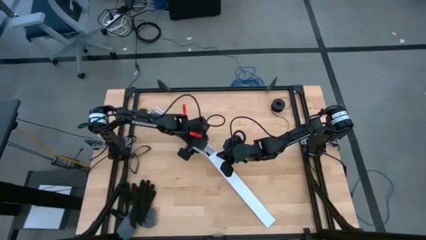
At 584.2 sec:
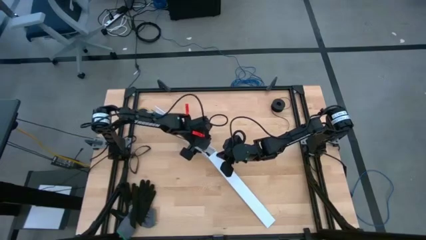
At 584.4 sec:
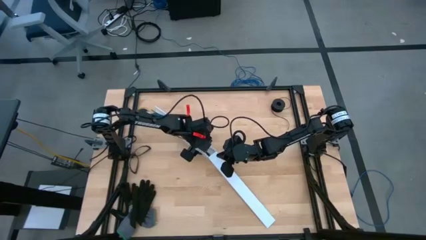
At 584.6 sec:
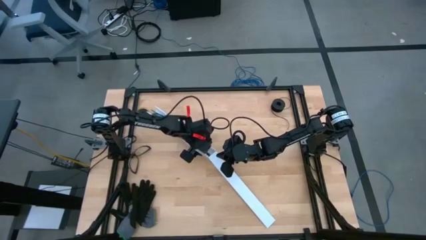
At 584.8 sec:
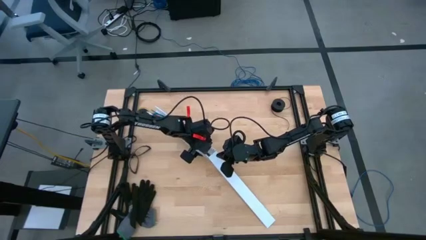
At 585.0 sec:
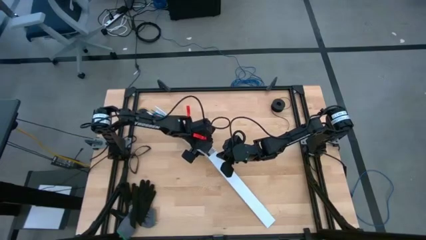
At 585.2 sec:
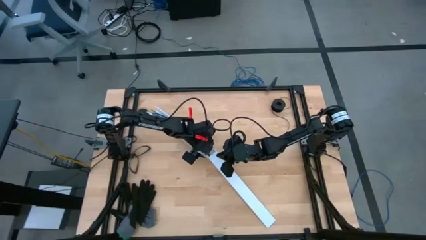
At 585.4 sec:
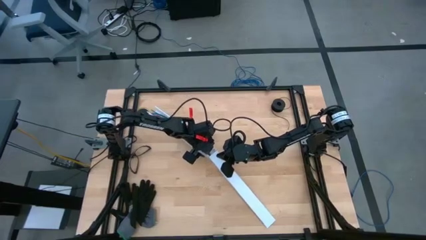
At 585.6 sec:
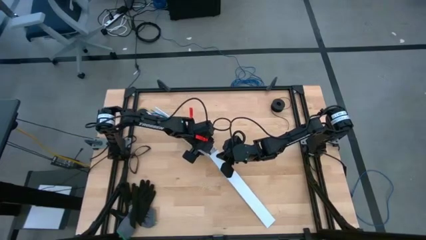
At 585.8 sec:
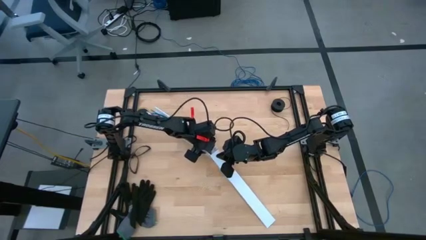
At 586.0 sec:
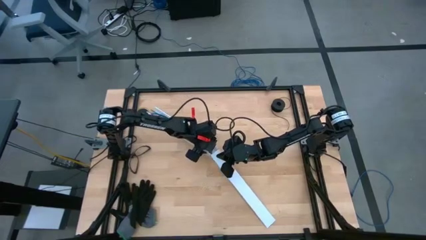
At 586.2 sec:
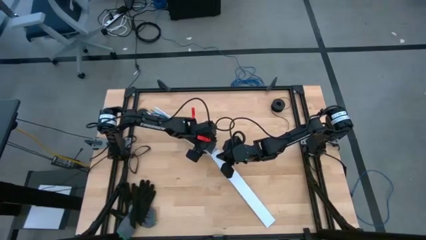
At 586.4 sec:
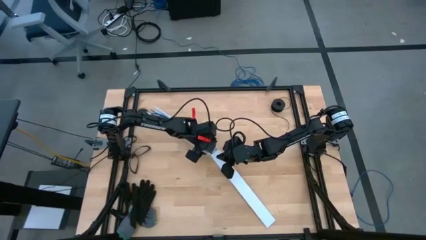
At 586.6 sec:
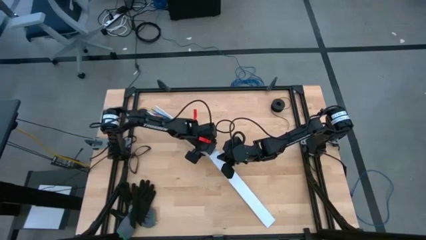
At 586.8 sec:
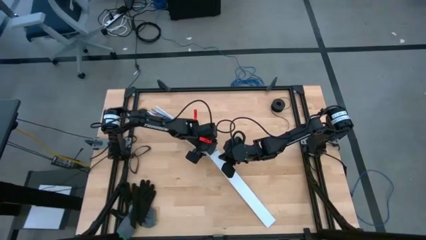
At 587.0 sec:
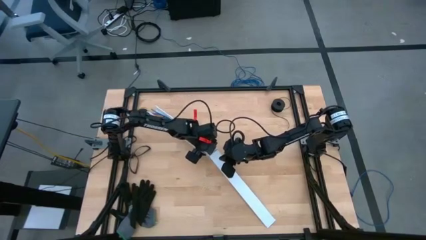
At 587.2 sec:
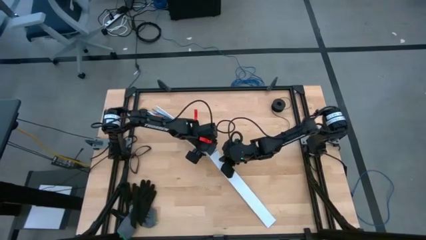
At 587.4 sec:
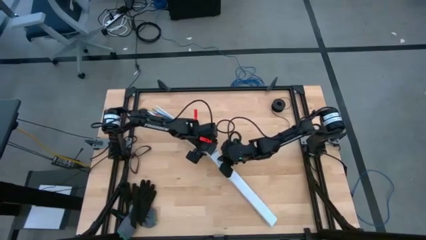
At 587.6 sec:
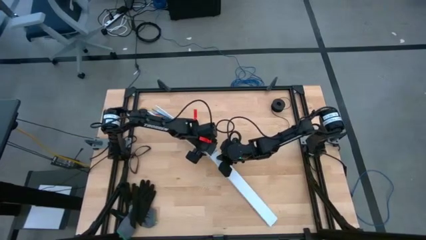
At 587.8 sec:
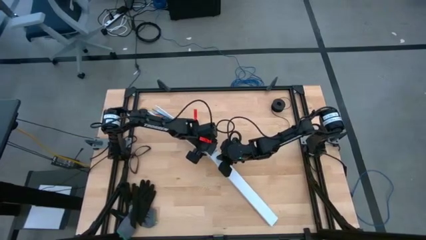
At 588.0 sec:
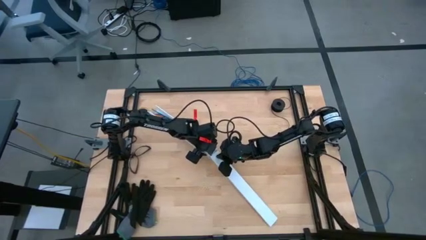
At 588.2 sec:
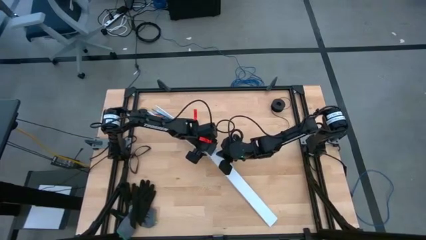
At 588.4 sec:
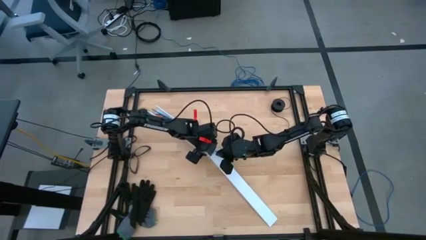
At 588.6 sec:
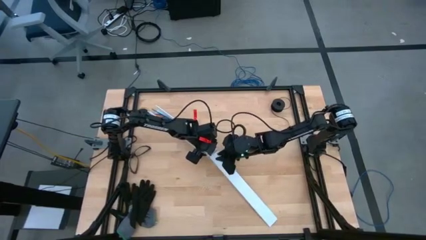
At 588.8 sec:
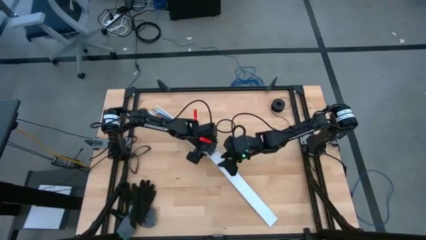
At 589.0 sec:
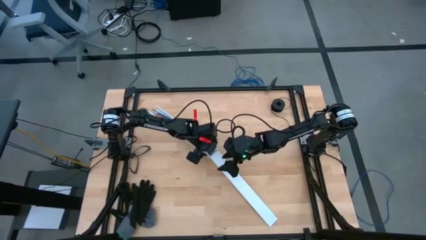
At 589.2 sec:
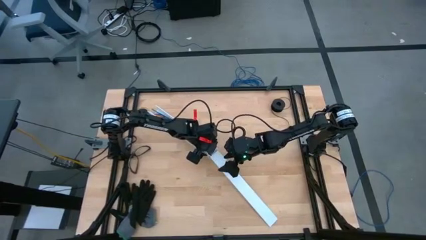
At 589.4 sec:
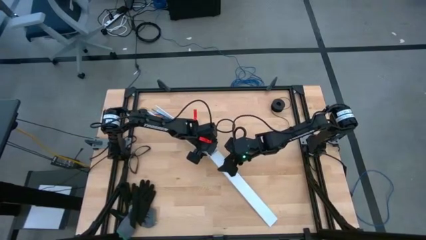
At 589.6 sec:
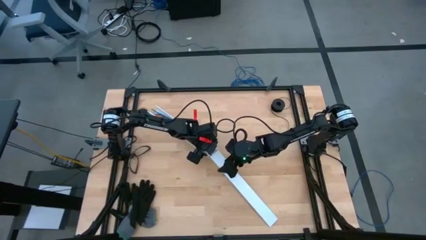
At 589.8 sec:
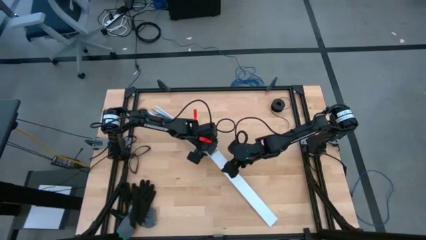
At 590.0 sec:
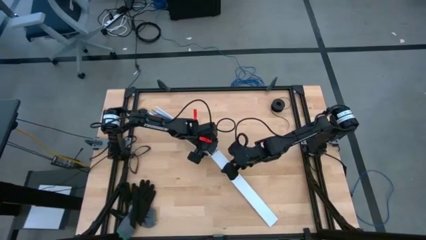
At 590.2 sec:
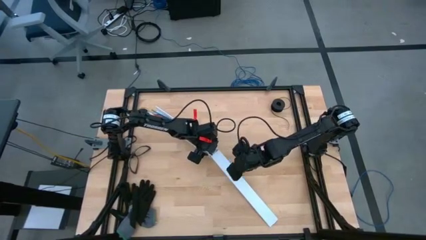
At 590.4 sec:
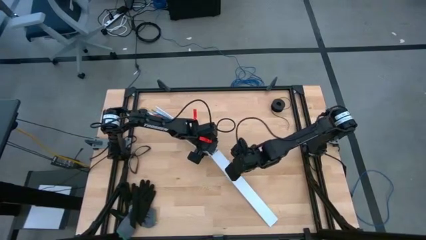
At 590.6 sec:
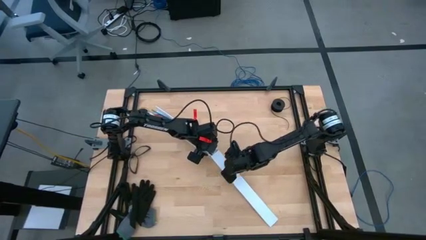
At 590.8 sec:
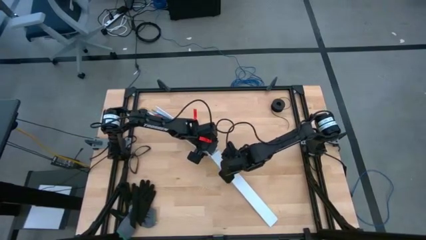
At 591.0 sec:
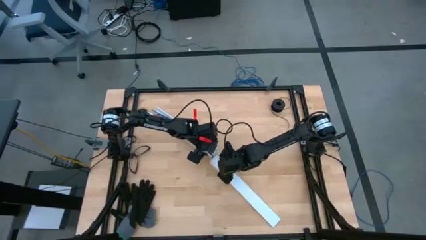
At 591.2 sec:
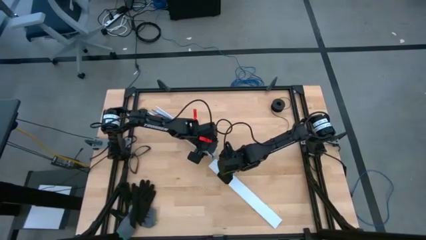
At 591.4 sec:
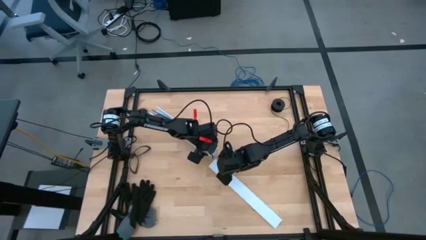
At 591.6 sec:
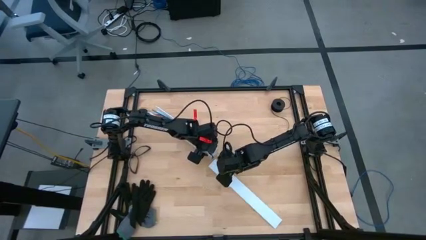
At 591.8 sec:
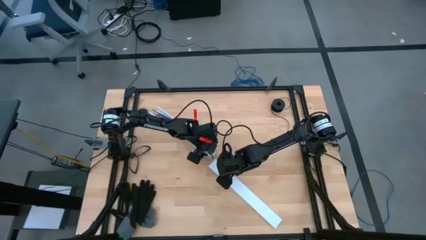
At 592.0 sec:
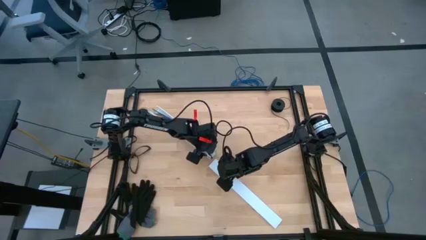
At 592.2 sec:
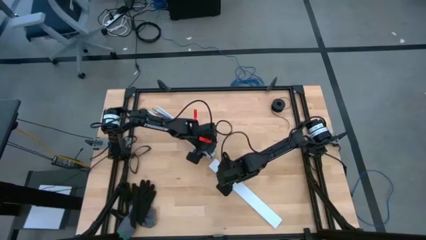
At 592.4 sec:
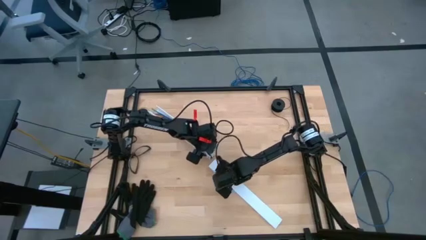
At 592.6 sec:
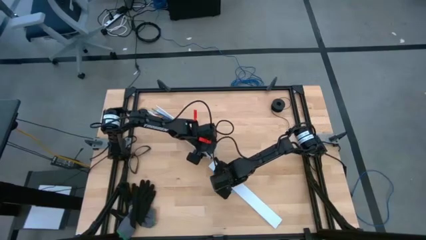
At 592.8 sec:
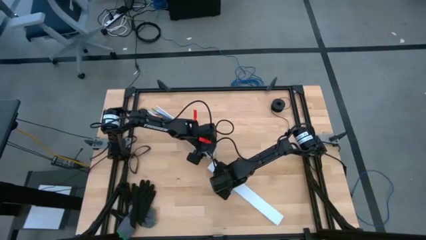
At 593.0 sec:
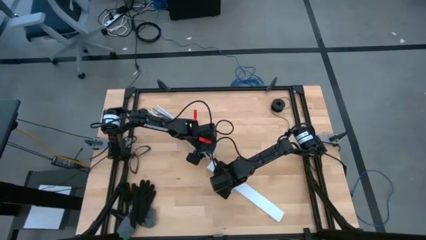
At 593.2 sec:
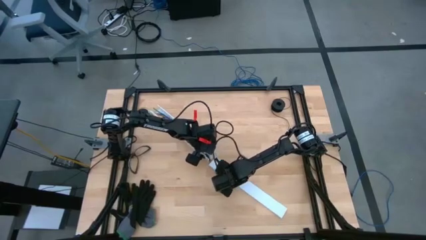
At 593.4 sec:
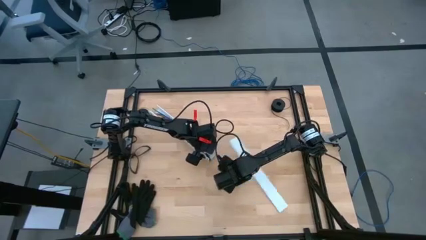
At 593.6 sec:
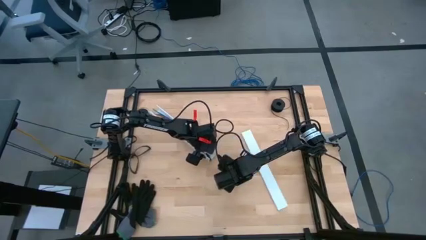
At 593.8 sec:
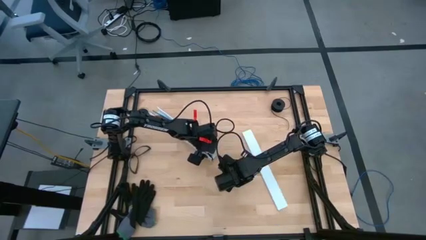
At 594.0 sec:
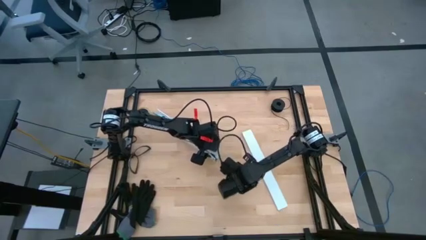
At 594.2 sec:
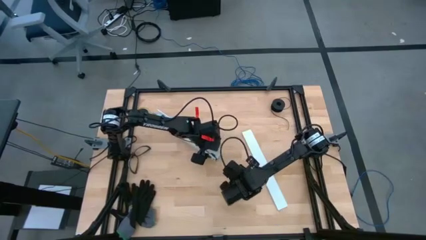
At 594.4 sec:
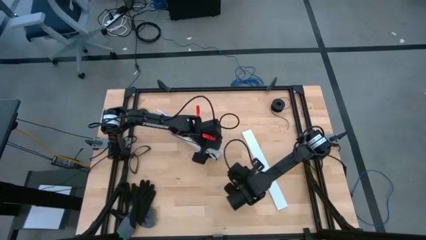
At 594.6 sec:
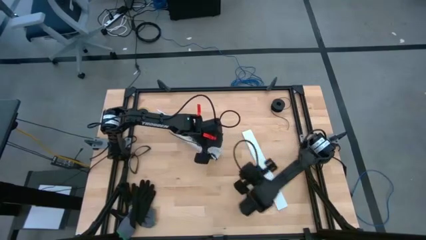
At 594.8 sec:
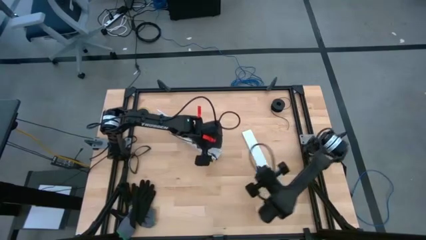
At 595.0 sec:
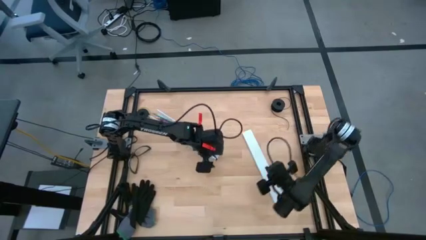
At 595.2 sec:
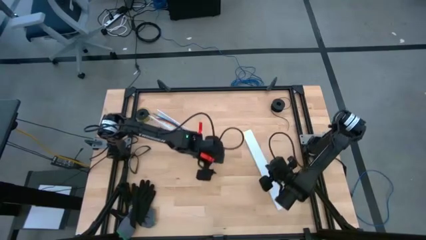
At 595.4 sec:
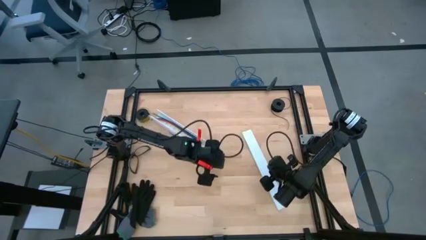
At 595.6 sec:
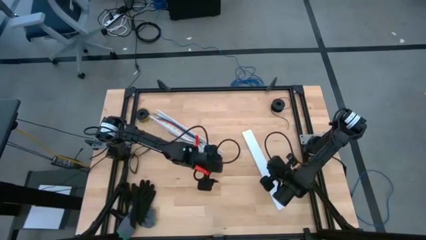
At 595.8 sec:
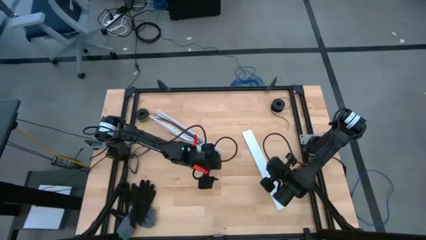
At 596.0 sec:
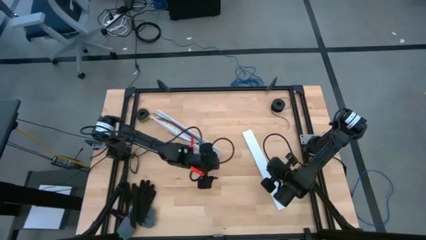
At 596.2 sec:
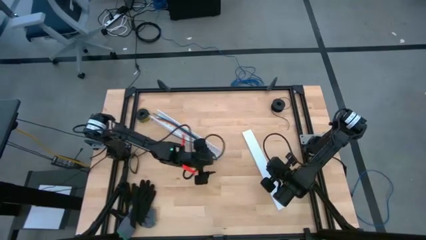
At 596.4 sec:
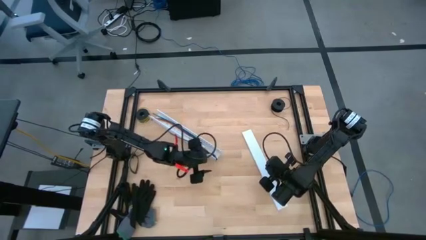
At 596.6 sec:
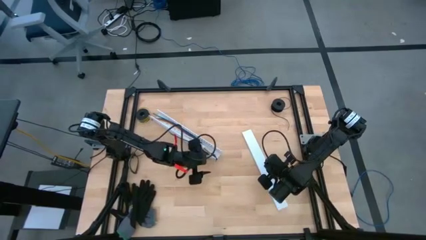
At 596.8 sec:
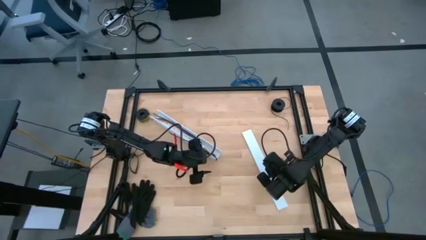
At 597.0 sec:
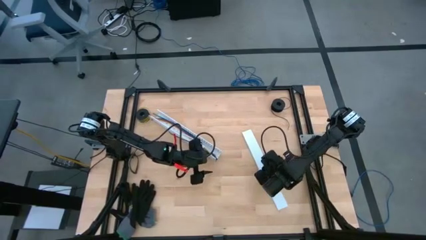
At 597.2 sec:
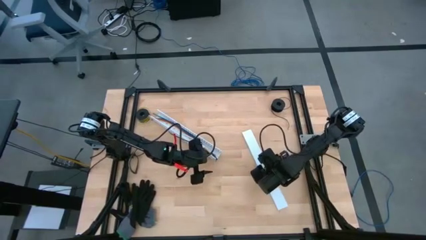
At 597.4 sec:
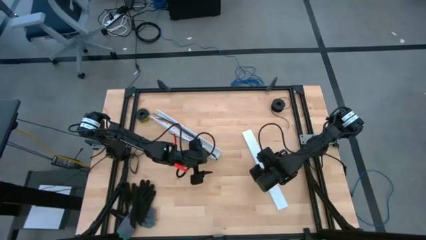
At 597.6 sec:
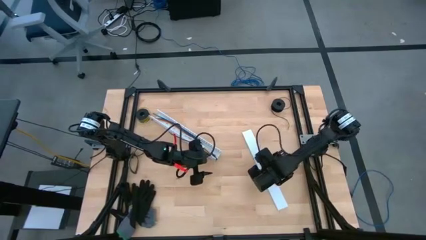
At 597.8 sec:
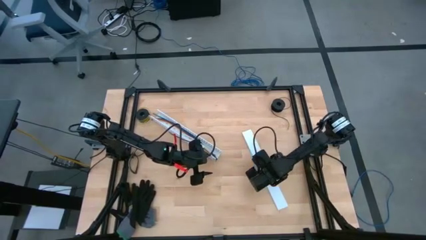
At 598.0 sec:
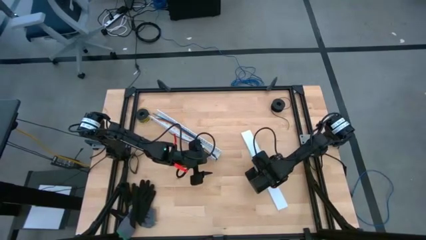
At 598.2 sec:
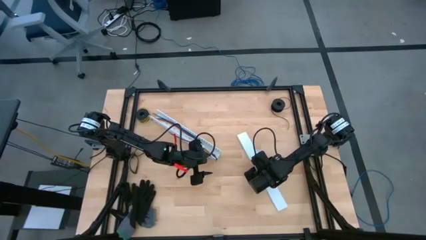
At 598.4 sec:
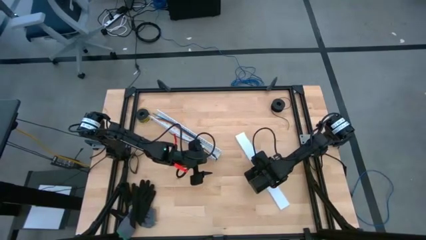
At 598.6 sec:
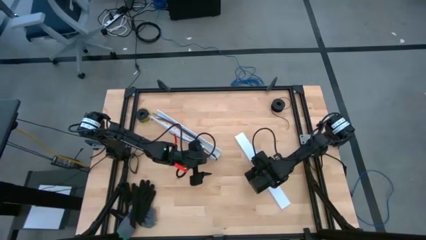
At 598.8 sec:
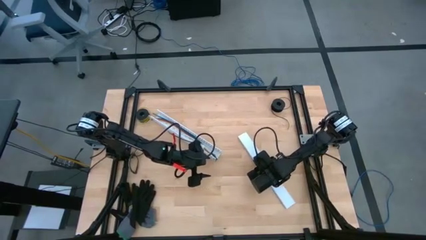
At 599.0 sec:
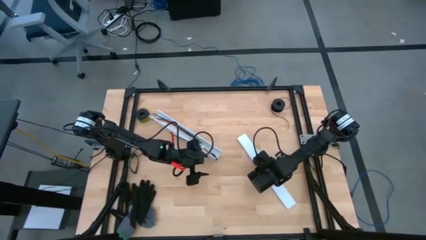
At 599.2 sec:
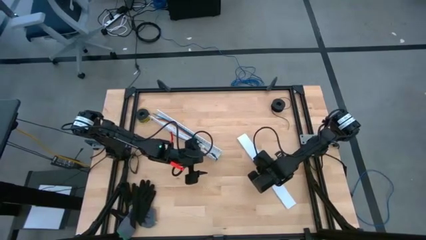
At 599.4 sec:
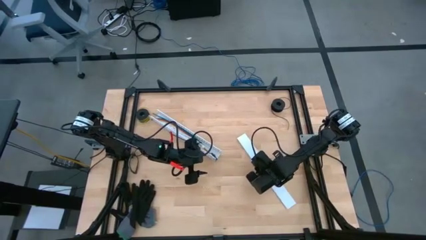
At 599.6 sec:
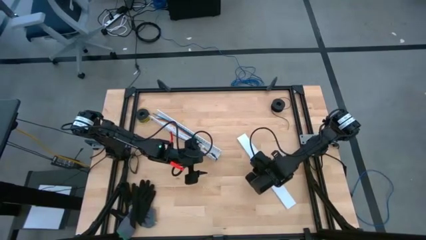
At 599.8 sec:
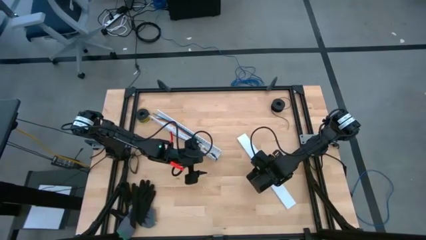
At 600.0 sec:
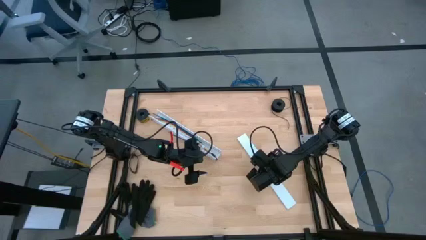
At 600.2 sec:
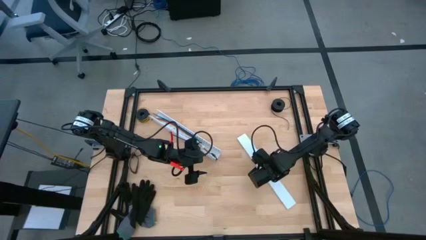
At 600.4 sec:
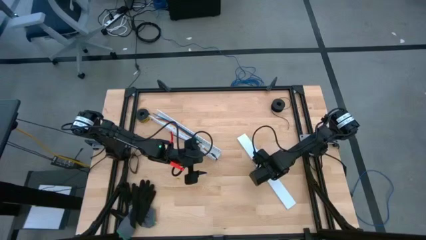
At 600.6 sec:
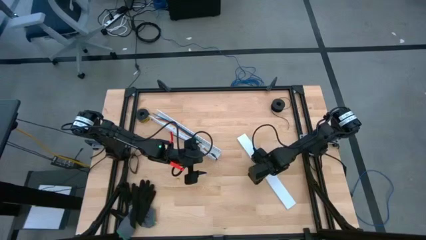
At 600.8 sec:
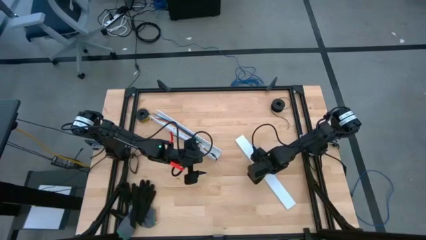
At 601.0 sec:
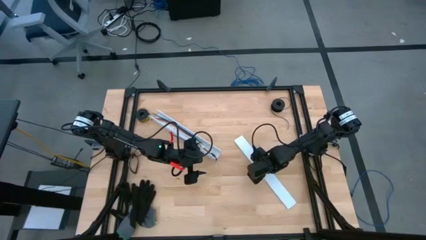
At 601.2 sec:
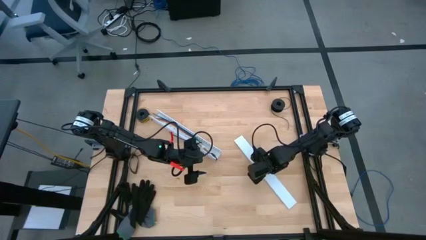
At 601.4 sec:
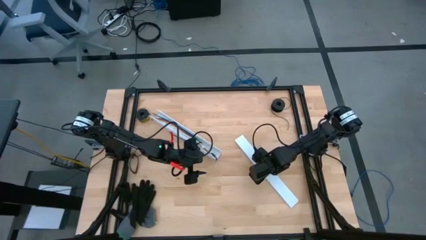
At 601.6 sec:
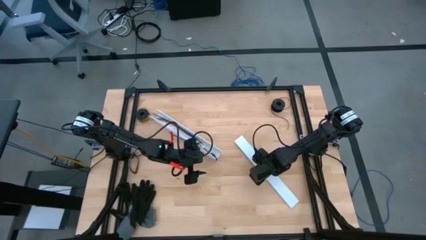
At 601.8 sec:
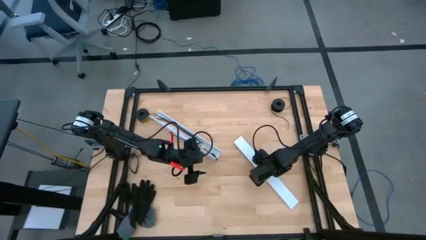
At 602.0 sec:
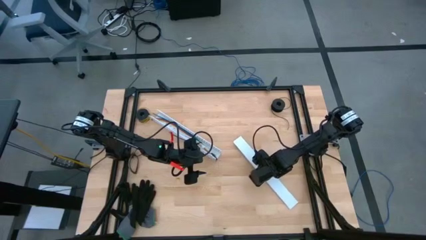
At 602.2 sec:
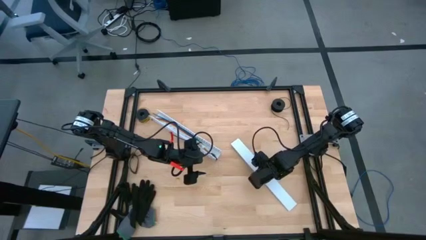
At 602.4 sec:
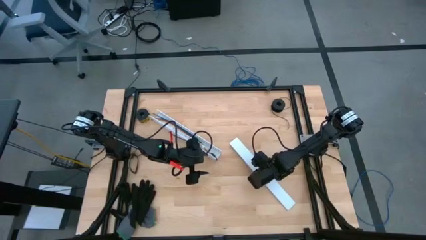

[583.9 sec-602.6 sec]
Task: Ziptie cables
Close the white cable duct
